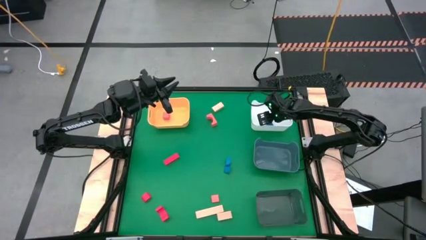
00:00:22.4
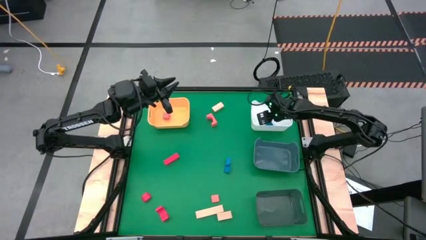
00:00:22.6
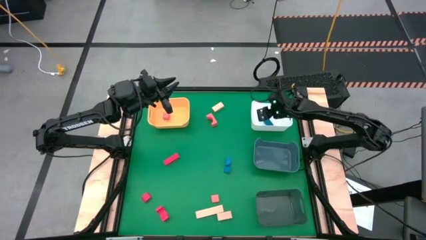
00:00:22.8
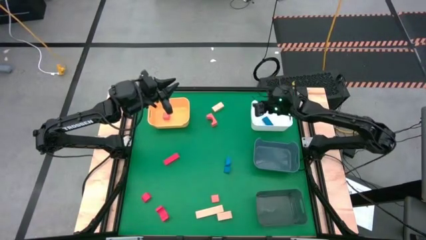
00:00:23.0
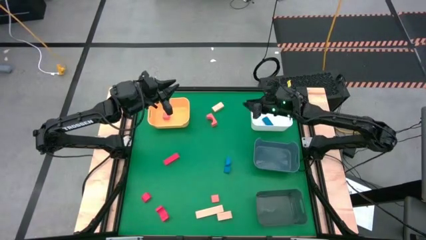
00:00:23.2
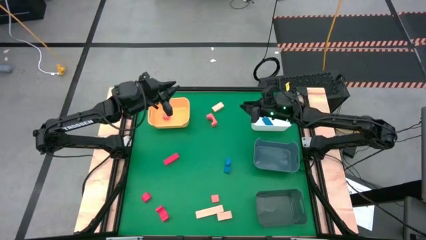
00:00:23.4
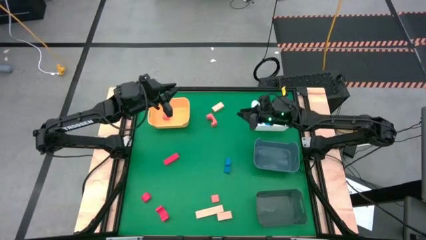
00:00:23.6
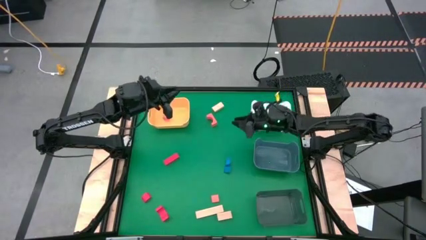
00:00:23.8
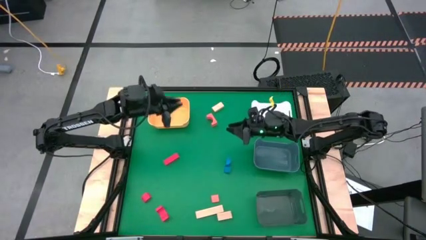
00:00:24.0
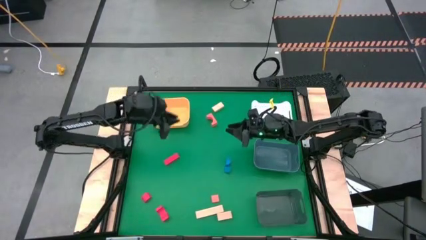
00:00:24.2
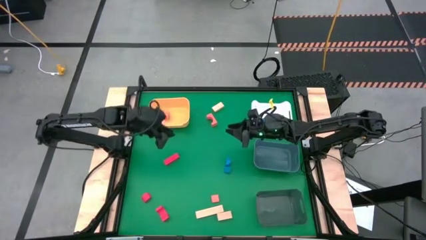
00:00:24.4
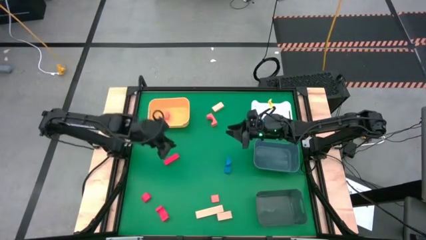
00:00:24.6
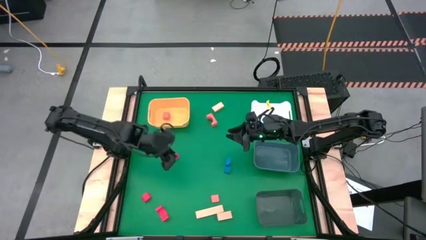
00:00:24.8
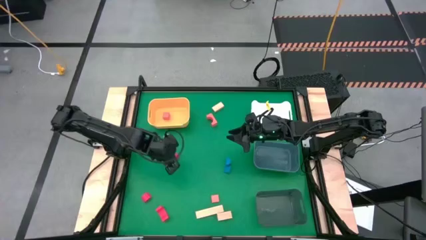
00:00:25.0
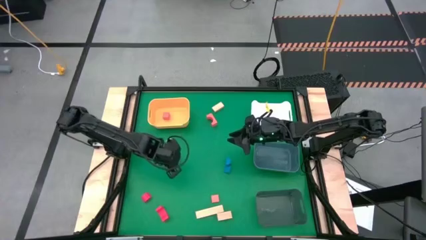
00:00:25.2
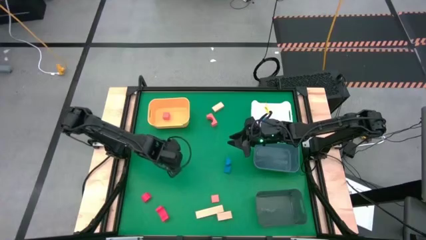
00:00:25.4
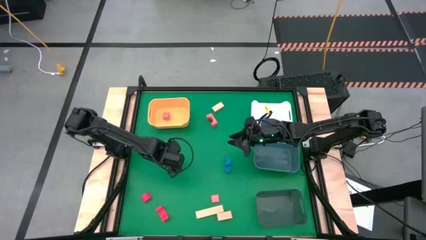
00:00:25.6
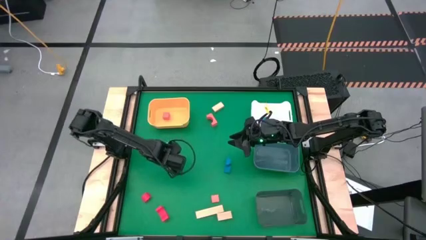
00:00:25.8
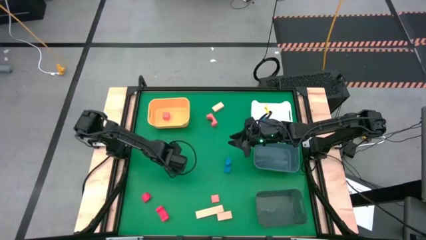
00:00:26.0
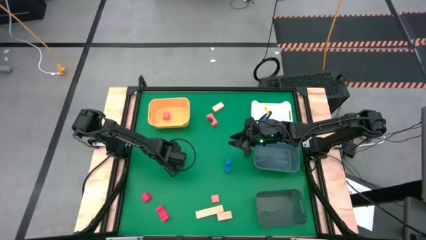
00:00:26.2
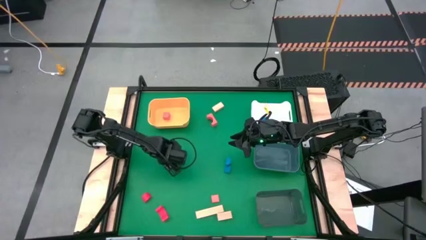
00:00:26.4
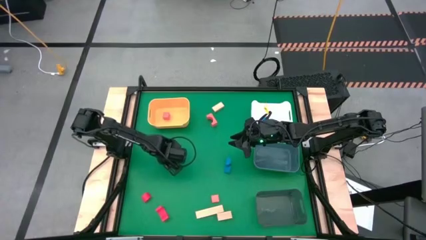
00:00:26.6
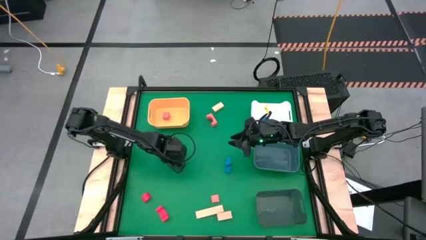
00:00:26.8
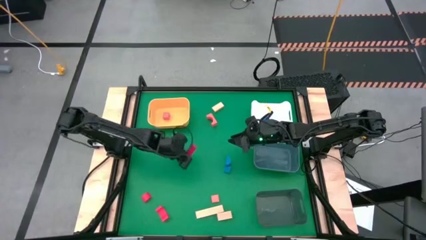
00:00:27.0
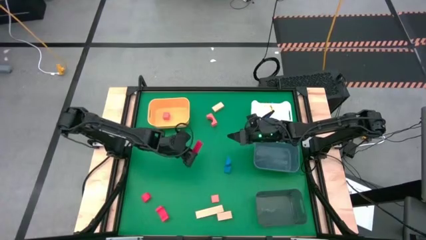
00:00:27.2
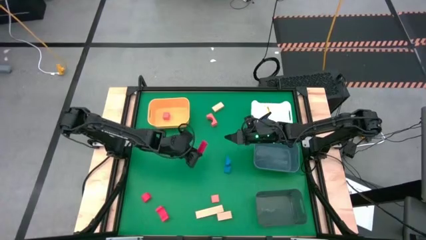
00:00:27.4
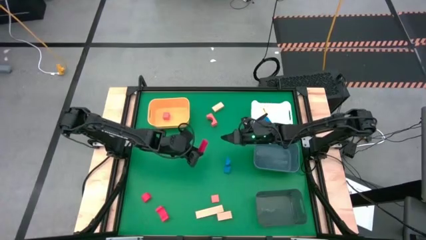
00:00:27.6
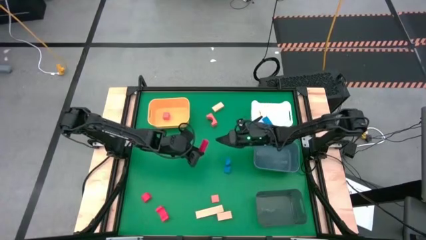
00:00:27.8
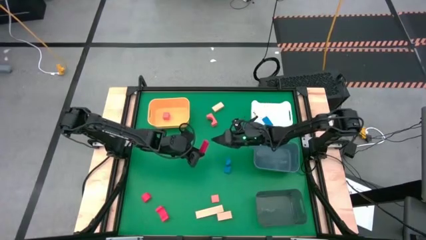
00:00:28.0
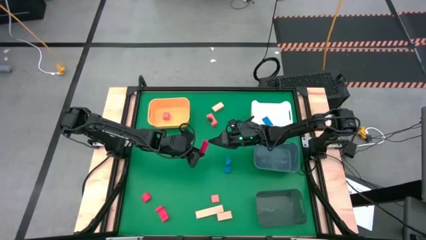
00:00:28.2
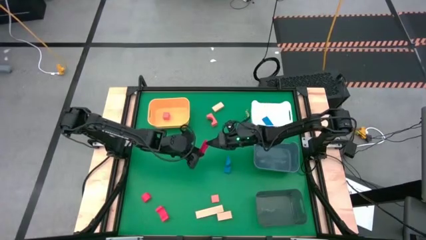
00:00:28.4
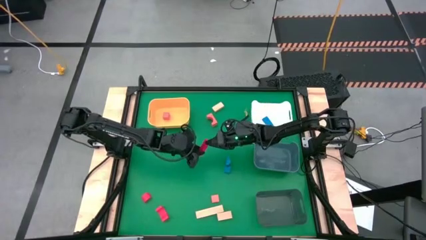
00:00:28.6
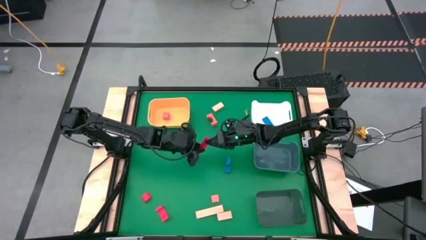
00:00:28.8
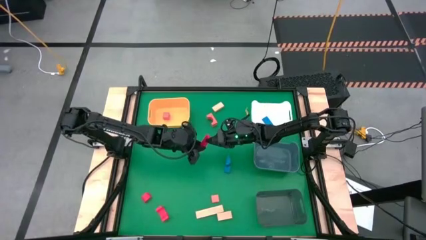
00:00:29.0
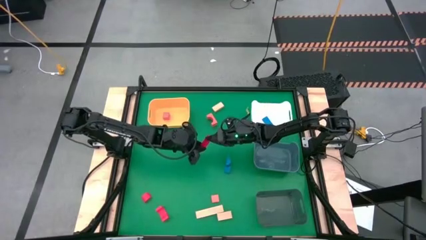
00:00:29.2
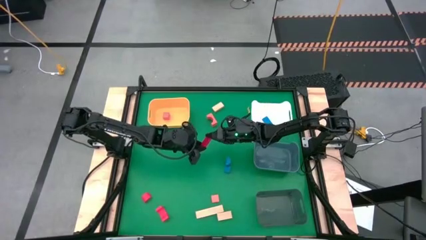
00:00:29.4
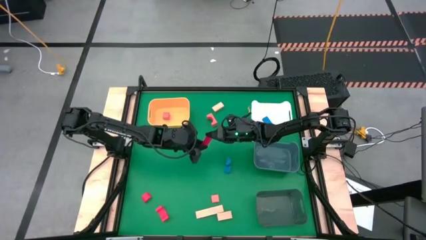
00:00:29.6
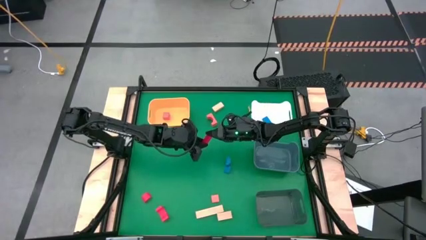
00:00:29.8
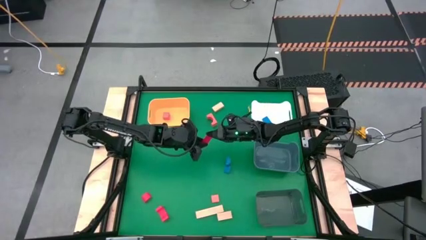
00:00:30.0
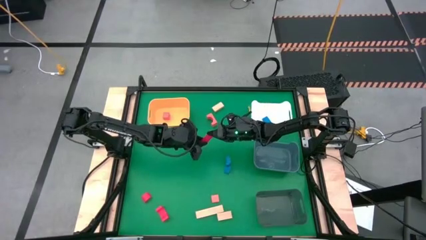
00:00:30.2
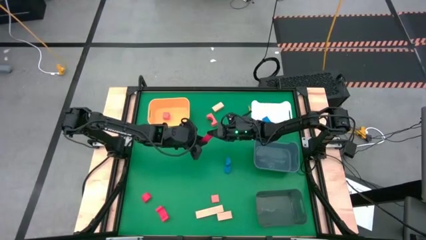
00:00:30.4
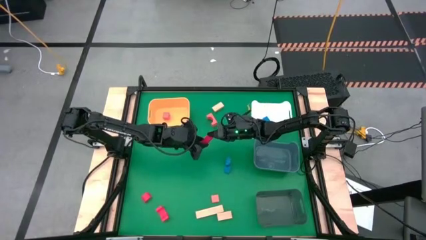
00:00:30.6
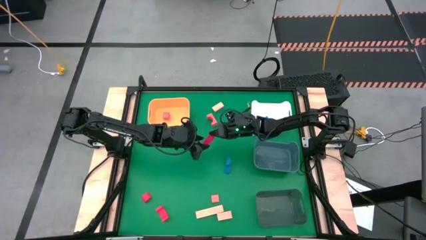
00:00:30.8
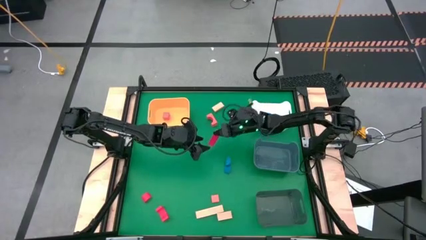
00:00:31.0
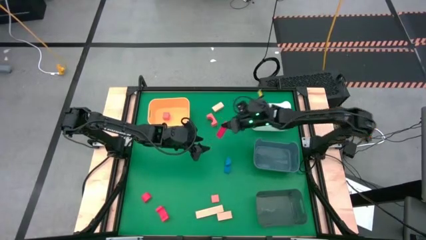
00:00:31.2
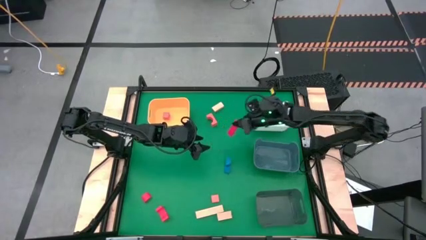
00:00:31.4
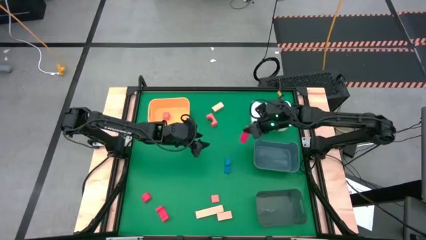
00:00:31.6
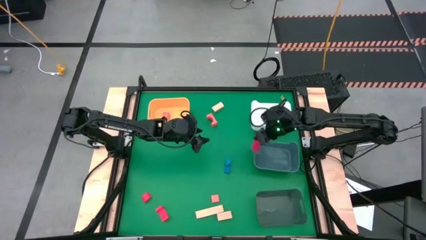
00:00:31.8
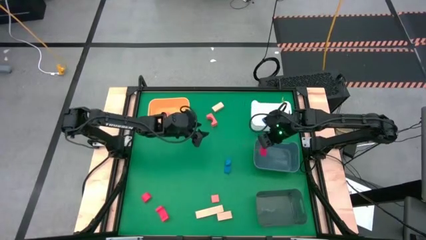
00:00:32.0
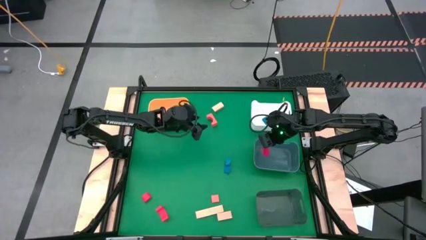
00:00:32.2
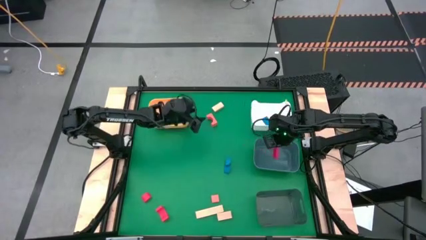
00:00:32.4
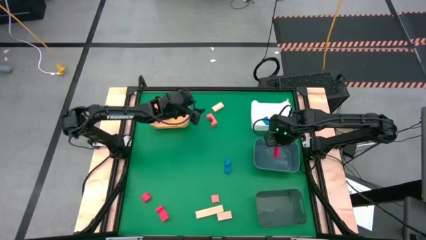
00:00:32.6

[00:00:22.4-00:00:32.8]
Task: Sort & place blocks by color
Put the top red block into the blue bin

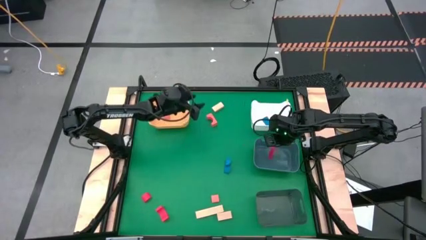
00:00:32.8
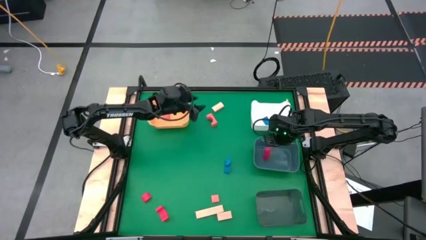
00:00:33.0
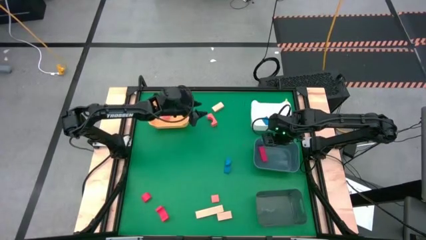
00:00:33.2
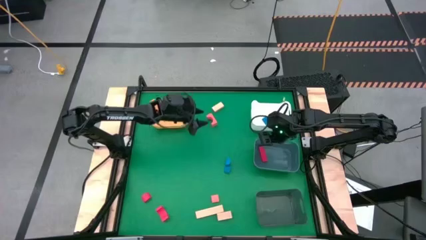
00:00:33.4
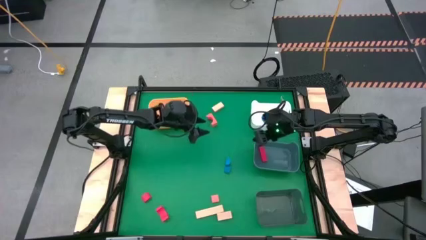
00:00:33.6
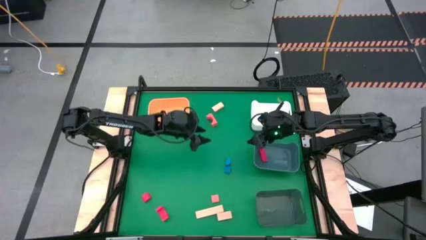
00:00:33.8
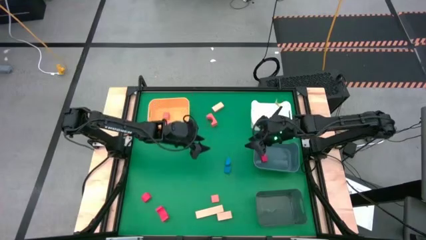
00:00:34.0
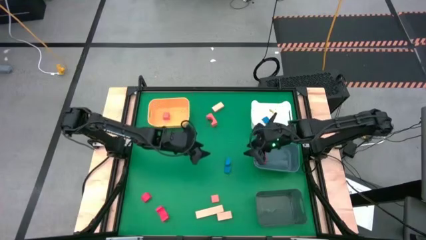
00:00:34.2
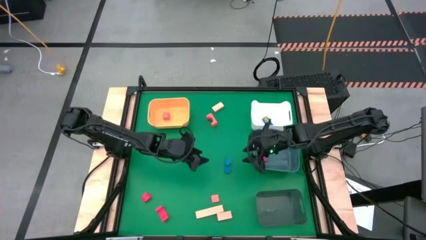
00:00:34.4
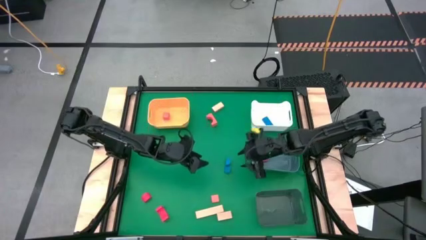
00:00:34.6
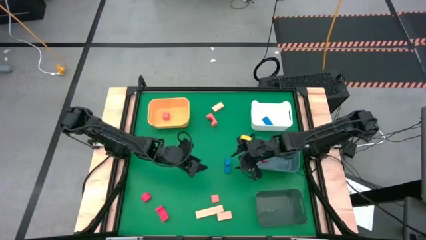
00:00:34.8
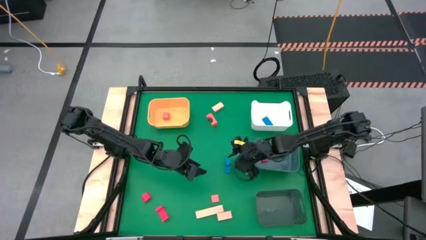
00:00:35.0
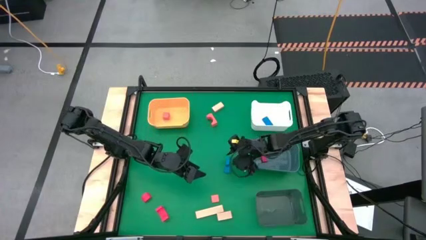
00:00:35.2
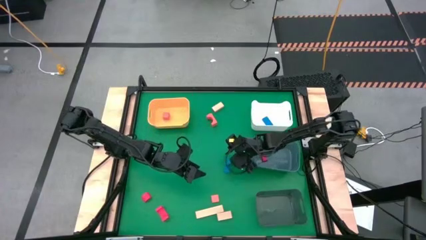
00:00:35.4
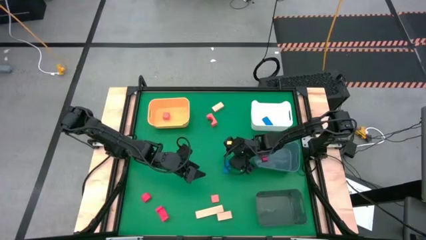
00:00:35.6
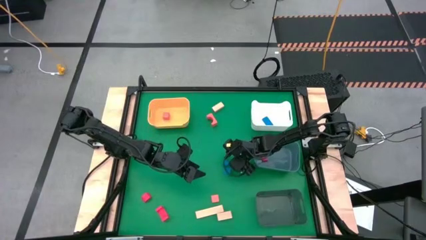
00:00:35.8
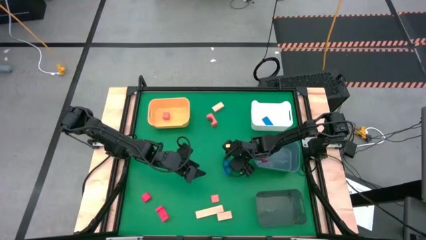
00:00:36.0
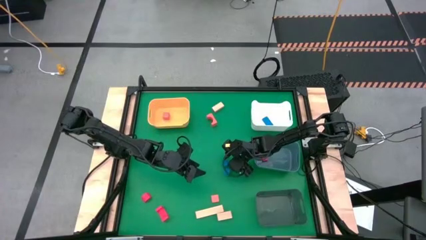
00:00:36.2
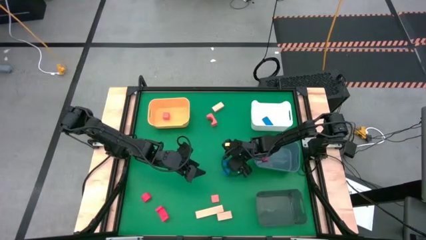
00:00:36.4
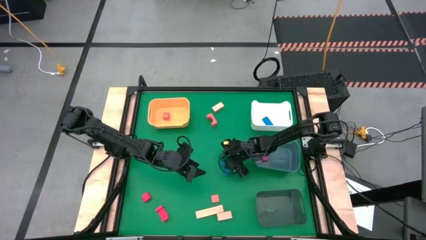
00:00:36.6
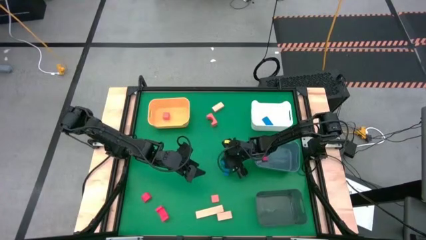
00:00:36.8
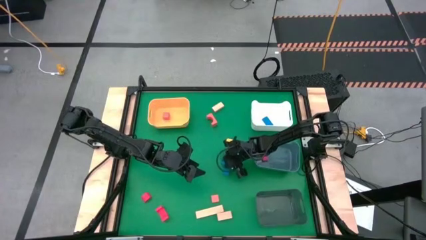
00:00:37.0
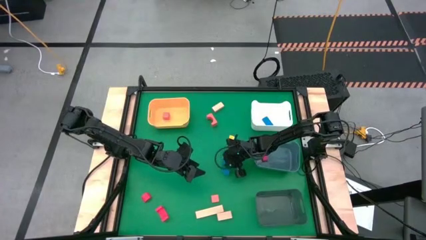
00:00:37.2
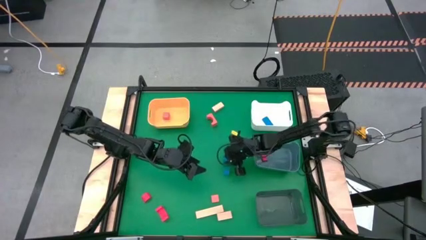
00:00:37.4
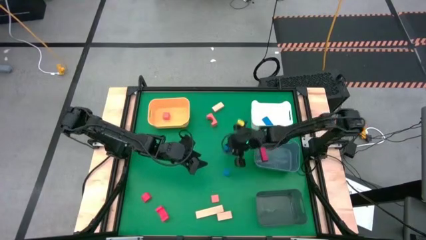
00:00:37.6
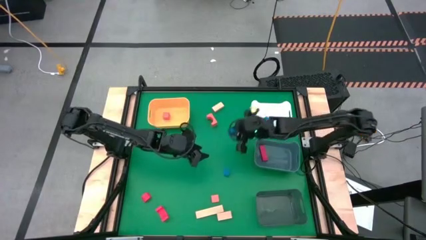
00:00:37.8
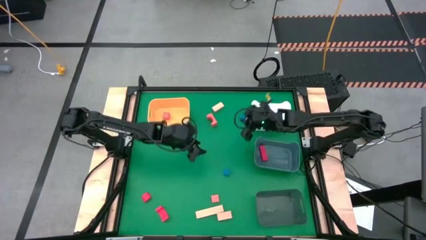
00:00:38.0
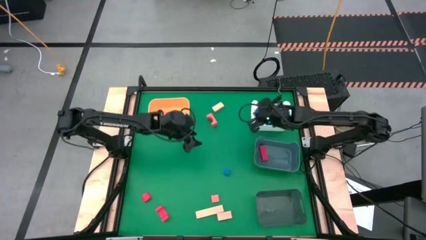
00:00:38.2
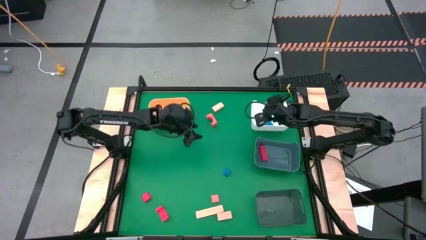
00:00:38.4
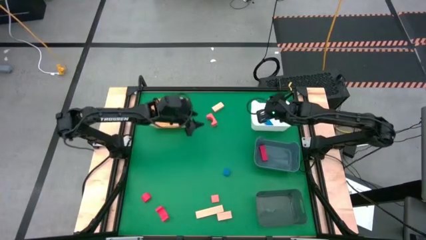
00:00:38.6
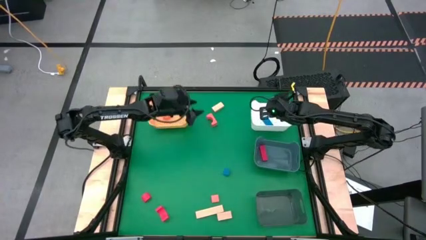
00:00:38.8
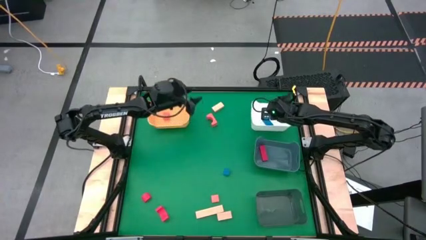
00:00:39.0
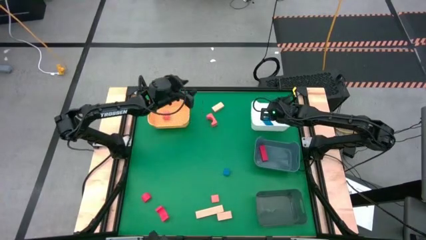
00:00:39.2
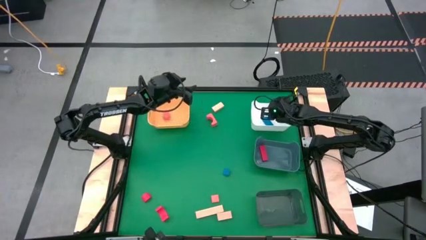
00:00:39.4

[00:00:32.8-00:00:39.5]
Put the top blue block into the white bin
